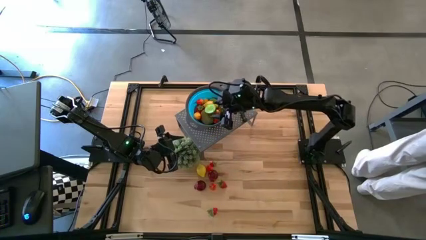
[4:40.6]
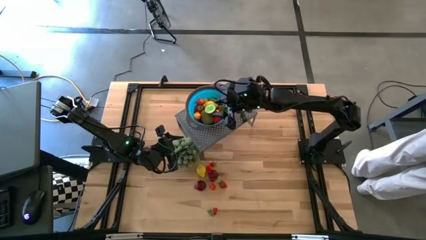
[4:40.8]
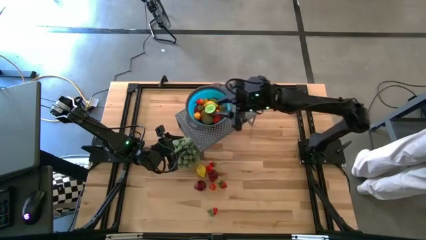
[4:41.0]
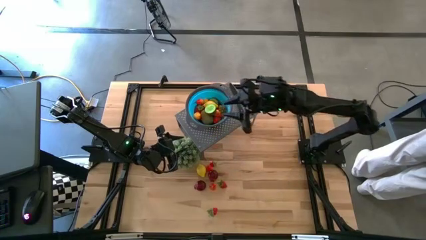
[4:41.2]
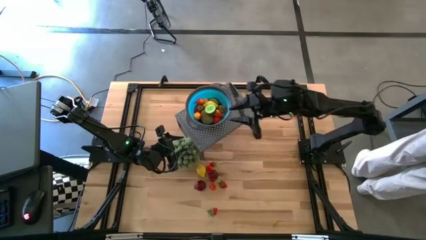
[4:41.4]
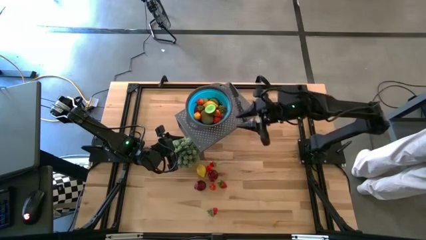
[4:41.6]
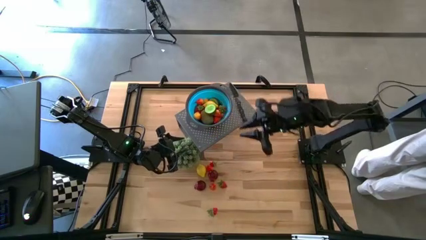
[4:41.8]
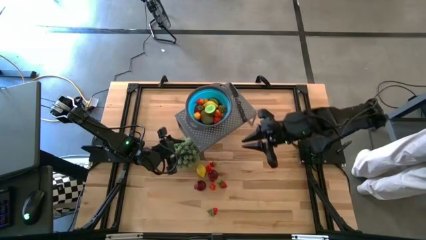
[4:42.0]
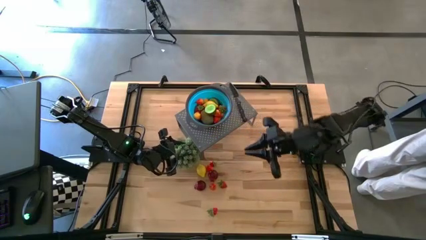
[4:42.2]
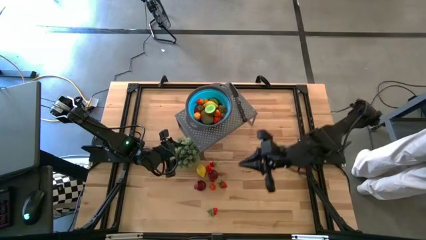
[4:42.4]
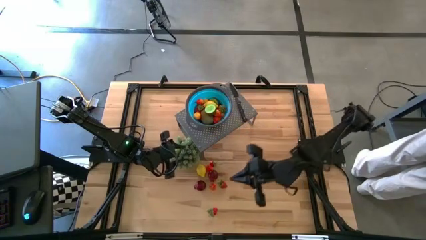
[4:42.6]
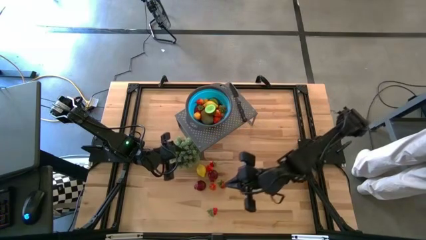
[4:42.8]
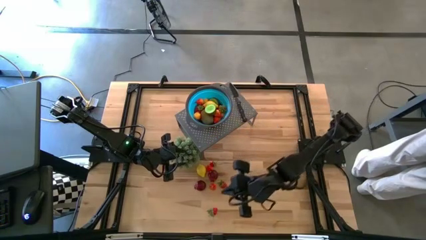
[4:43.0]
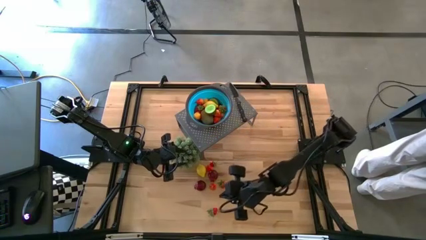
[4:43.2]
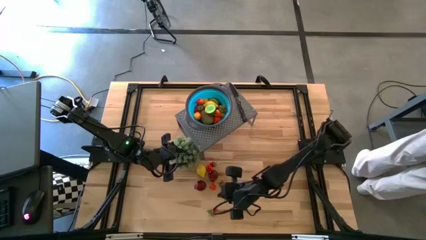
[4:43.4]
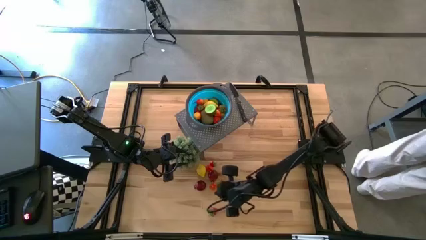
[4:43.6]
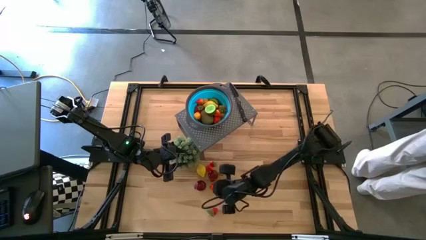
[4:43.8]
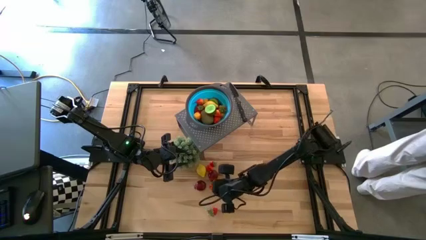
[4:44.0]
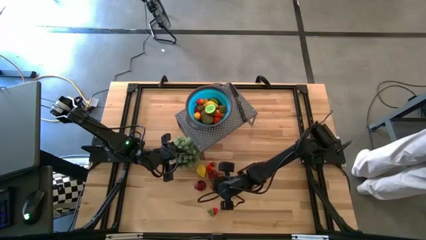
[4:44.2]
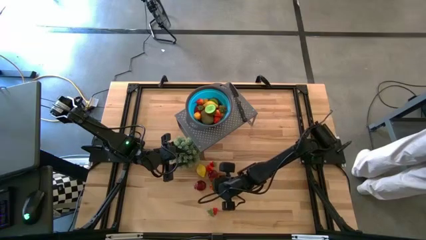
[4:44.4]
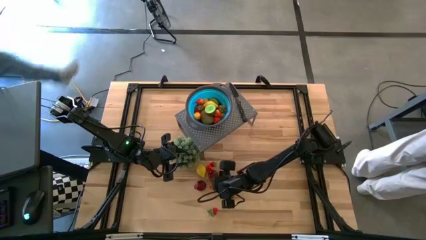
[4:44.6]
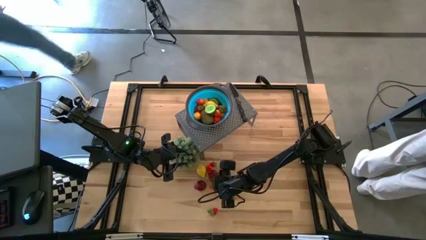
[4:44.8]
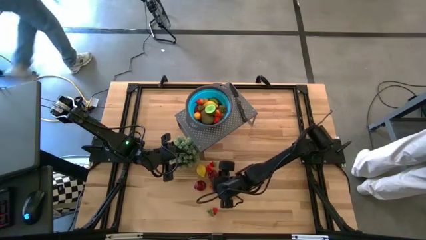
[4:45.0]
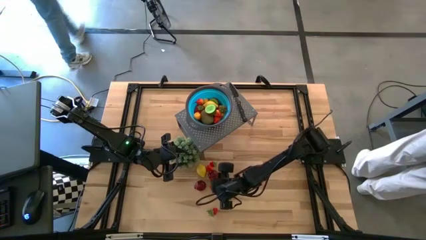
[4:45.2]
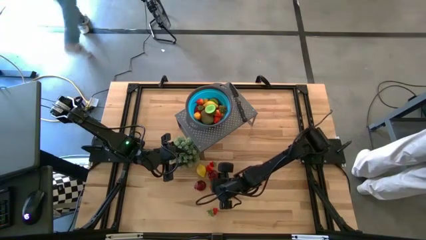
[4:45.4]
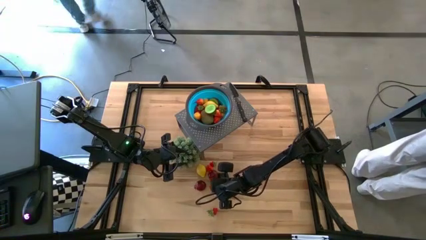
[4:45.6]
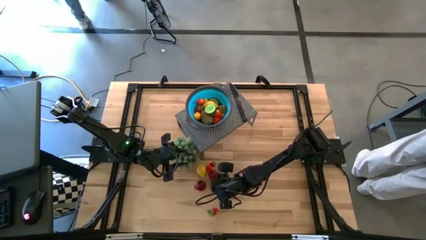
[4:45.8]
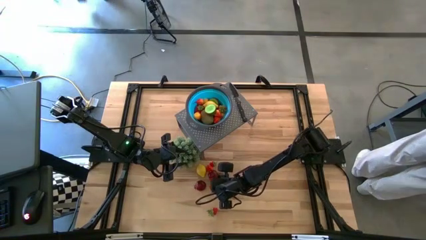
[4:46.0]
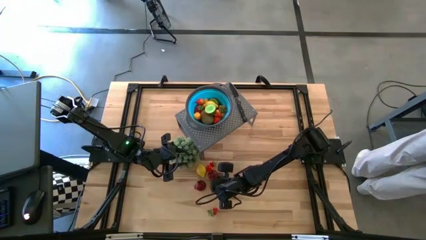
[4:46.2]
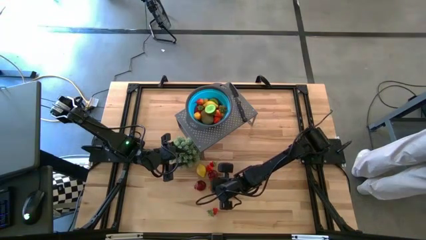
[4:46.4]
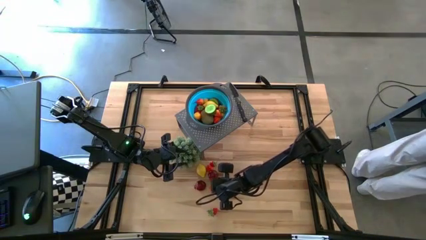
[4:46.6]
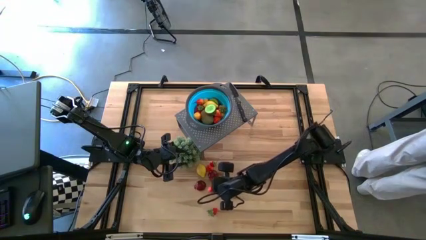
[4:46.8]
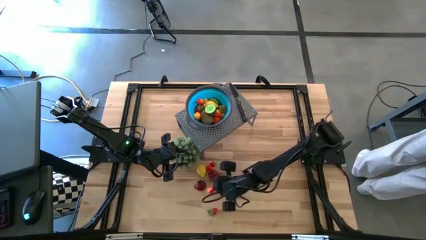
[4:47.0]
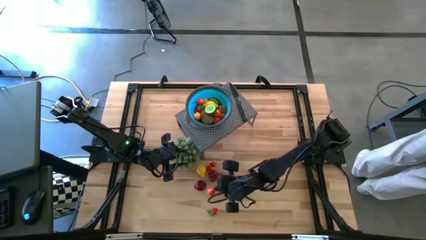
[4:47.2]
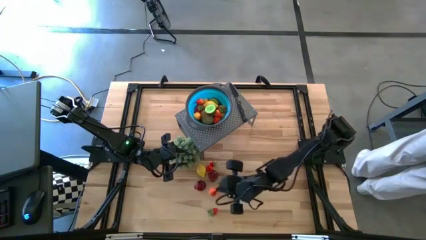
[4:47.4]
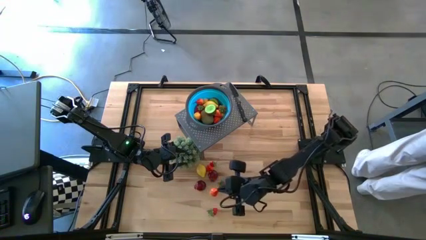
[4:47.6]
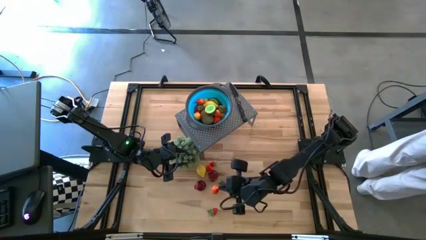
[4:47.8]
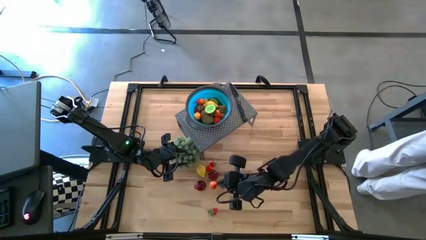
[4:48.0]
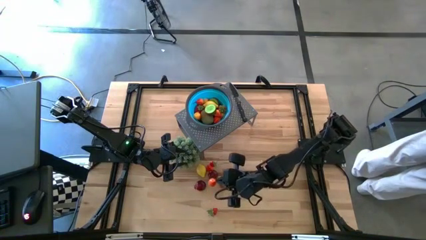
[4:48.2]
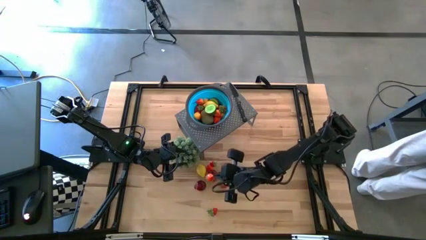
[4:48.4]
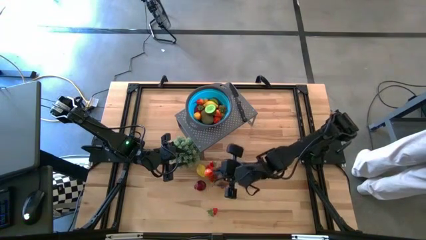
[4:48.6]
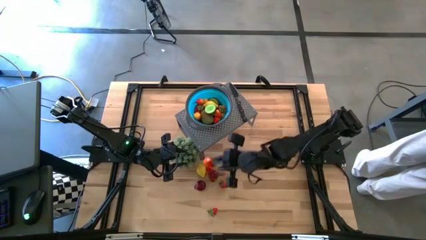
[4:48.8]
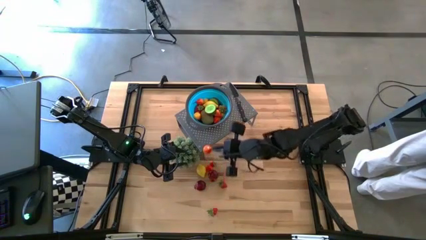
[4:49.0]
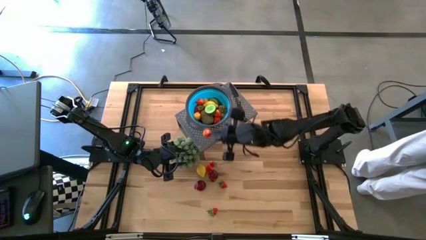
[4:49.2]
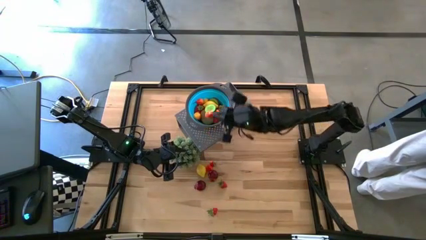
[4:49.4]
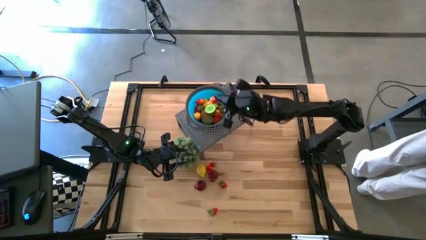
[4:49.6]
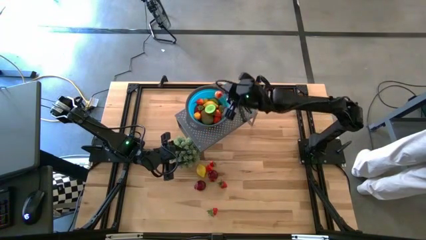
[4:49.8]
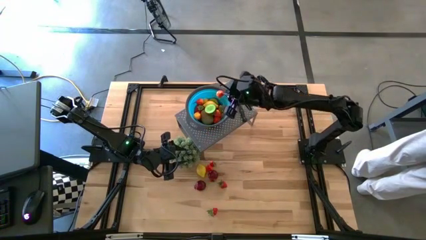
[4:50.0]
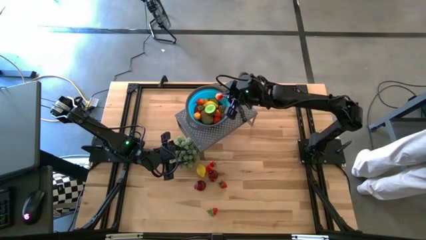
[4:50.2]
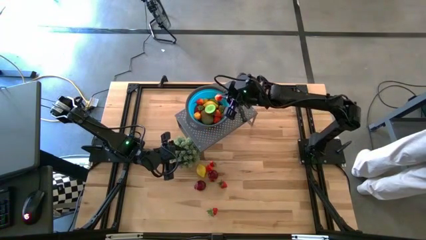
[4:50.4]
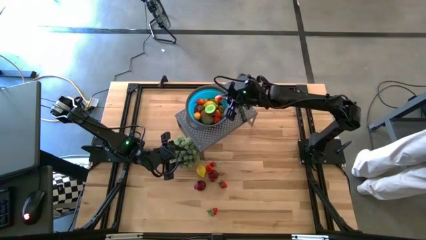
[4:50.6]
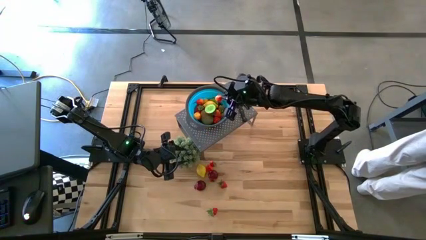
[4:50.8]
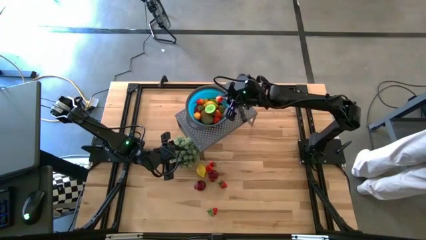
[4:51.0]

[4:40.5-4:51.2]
Task: Pick & Place Fruit
Put the pear into the blue strainer bowl on the shelf
